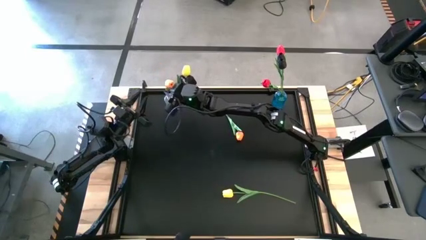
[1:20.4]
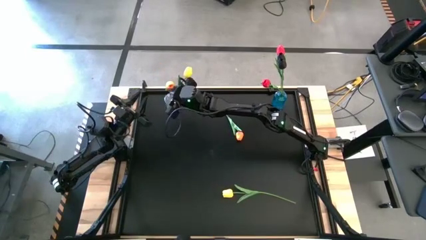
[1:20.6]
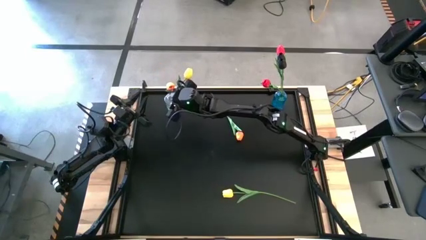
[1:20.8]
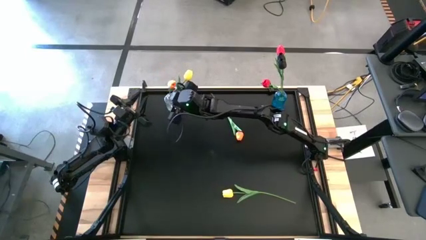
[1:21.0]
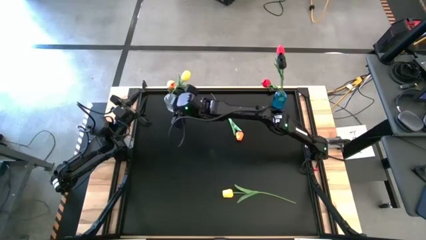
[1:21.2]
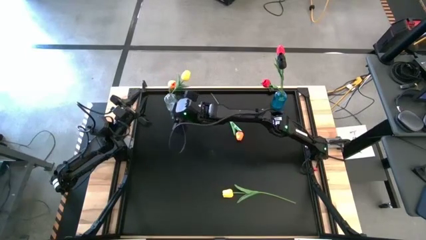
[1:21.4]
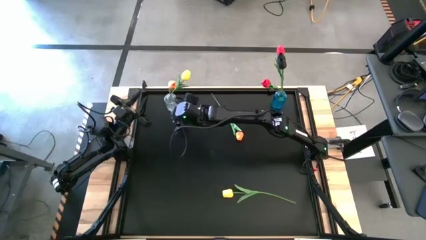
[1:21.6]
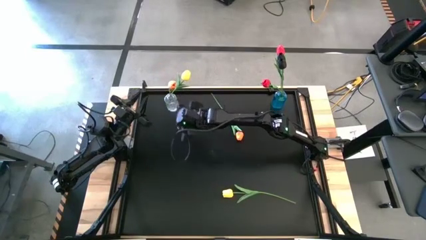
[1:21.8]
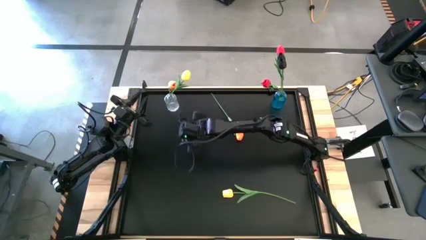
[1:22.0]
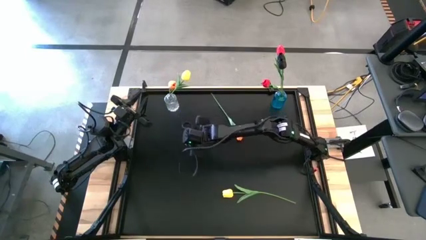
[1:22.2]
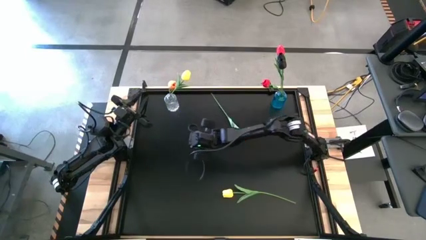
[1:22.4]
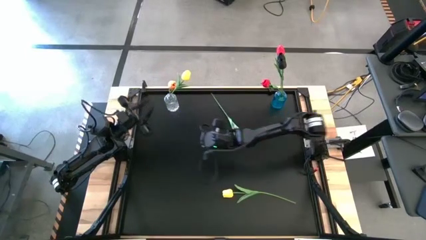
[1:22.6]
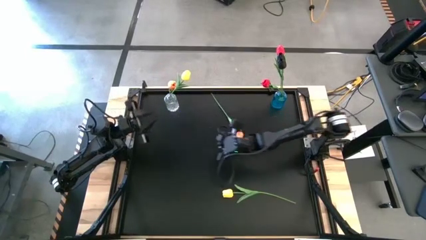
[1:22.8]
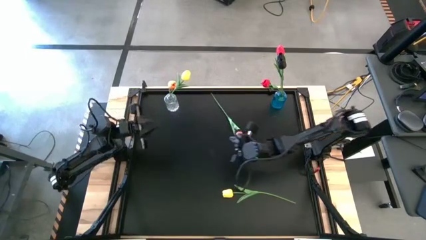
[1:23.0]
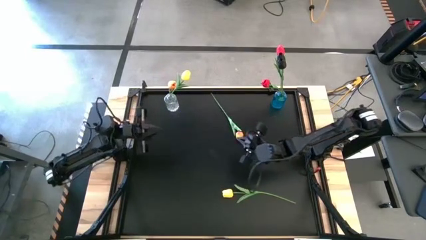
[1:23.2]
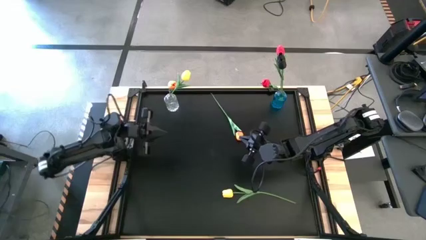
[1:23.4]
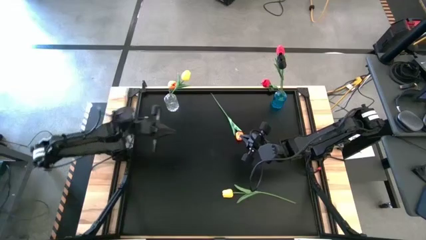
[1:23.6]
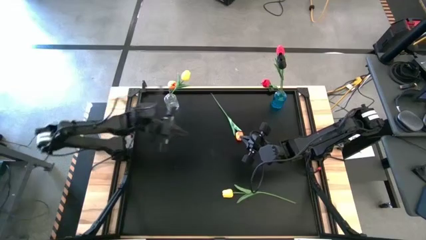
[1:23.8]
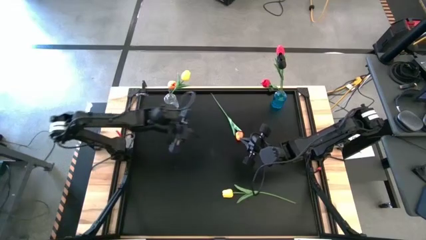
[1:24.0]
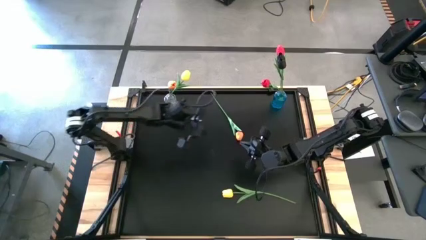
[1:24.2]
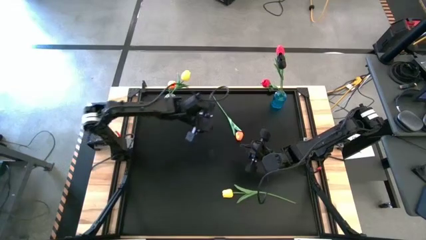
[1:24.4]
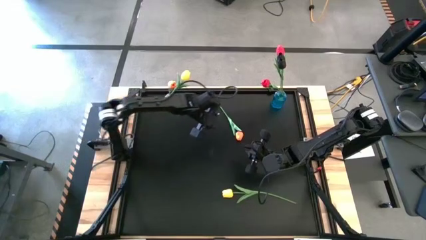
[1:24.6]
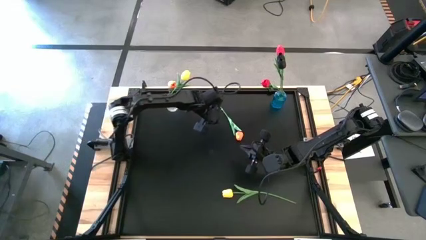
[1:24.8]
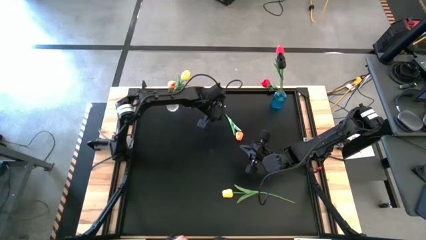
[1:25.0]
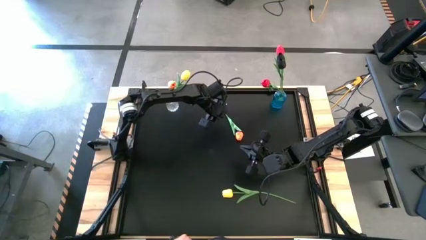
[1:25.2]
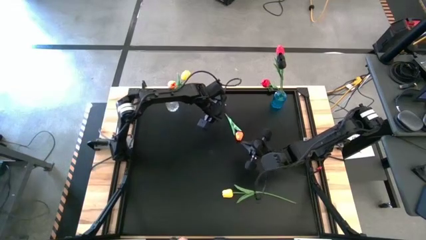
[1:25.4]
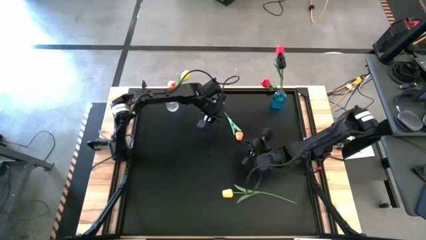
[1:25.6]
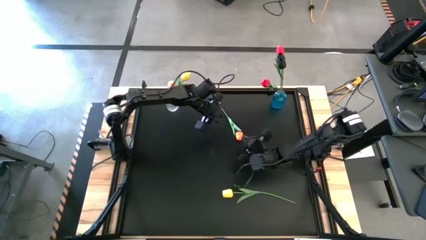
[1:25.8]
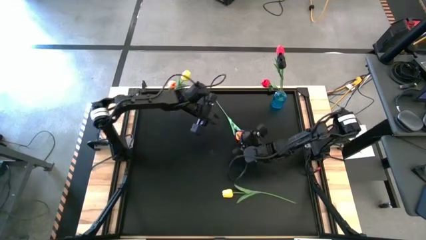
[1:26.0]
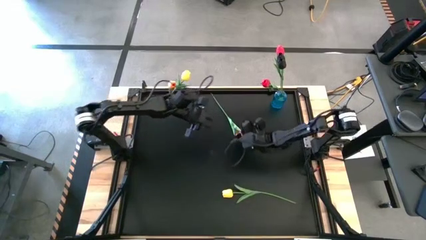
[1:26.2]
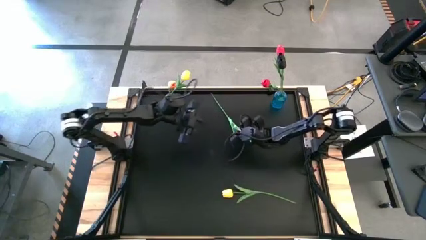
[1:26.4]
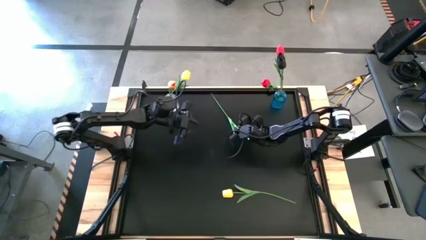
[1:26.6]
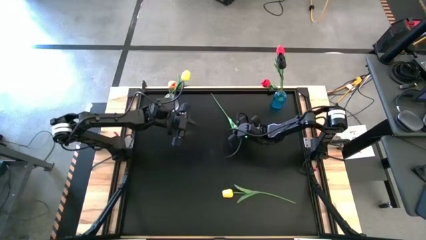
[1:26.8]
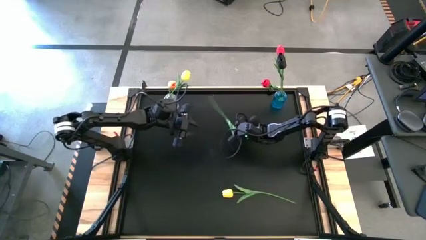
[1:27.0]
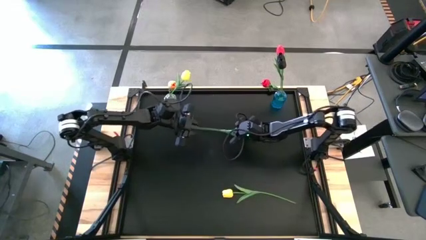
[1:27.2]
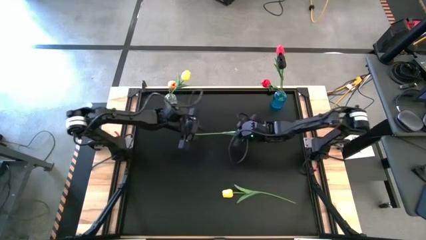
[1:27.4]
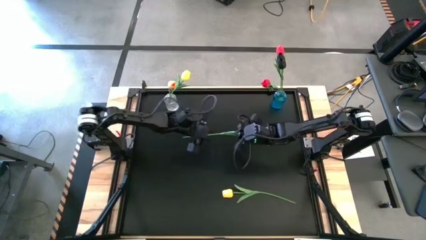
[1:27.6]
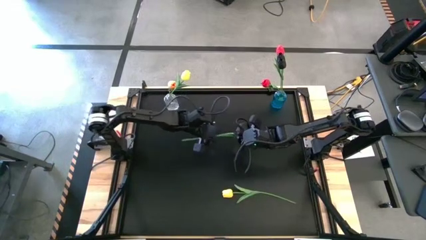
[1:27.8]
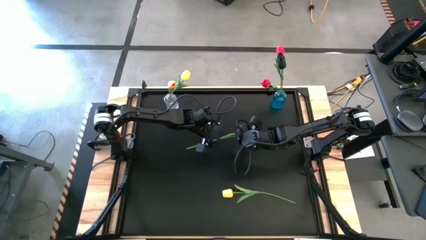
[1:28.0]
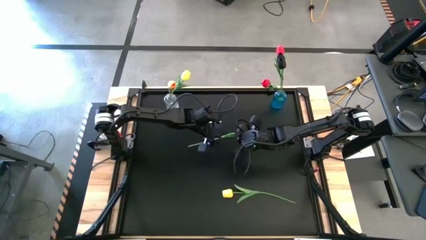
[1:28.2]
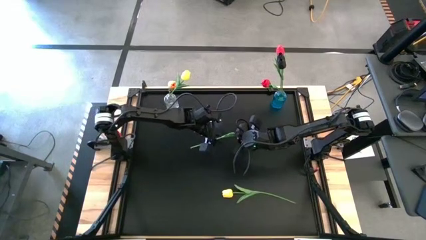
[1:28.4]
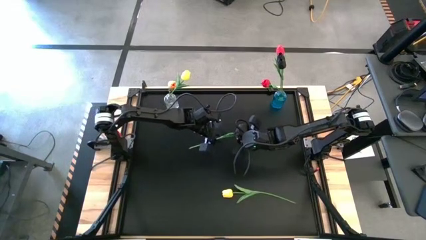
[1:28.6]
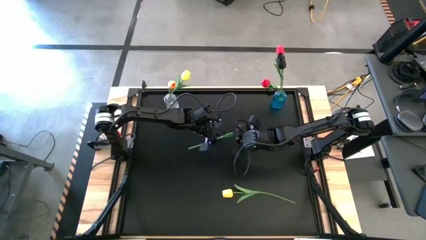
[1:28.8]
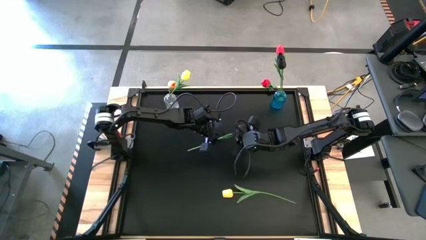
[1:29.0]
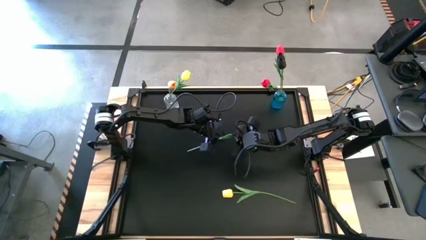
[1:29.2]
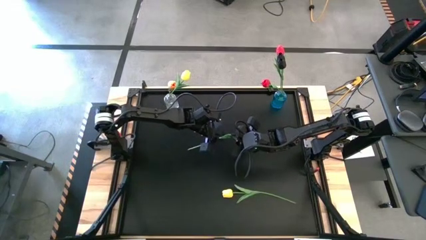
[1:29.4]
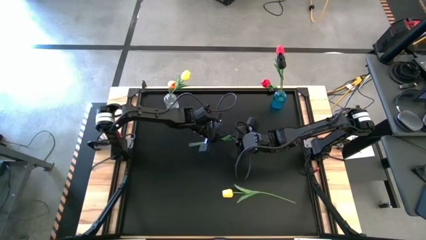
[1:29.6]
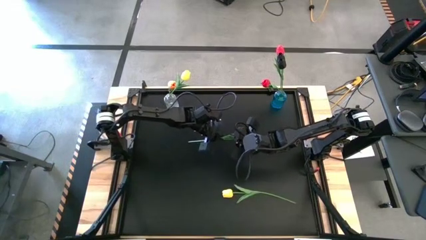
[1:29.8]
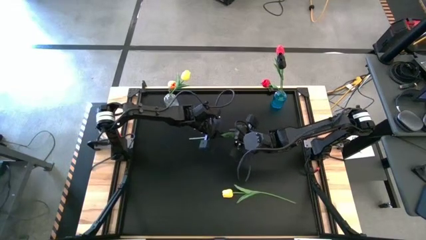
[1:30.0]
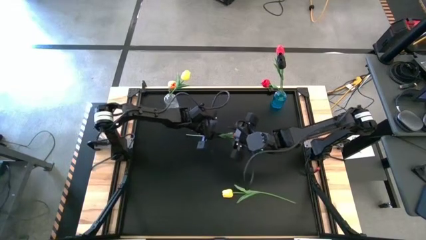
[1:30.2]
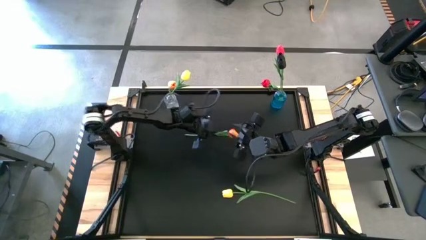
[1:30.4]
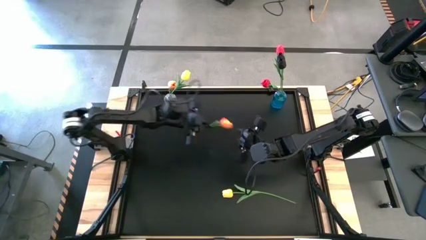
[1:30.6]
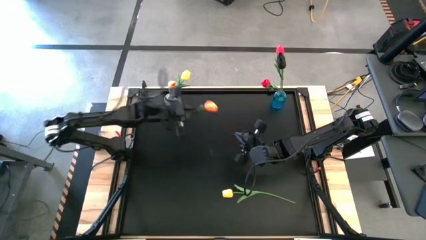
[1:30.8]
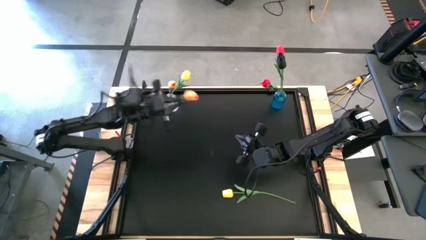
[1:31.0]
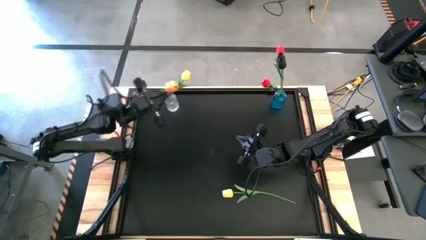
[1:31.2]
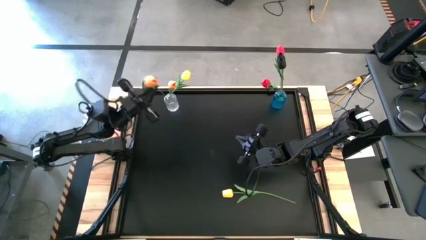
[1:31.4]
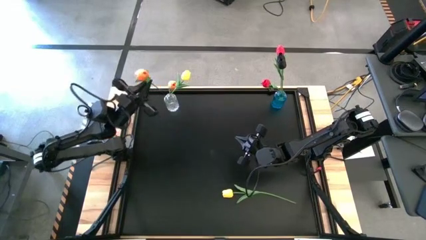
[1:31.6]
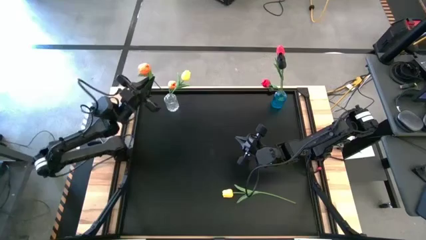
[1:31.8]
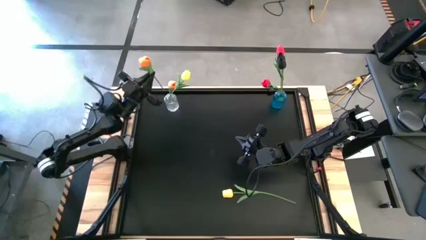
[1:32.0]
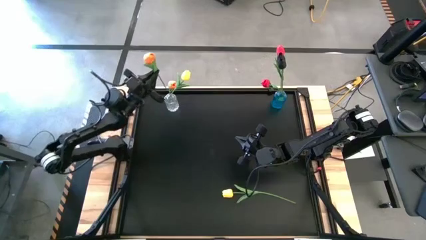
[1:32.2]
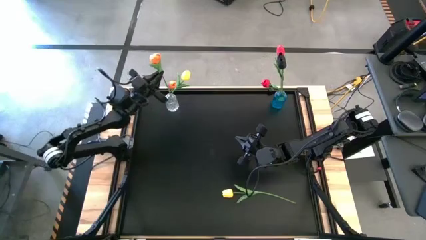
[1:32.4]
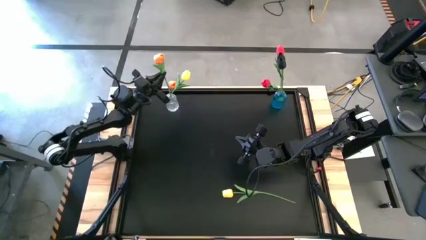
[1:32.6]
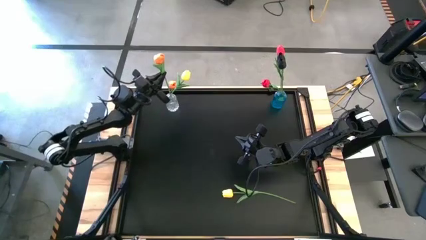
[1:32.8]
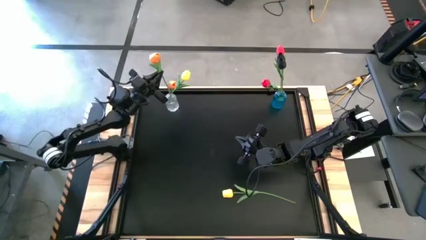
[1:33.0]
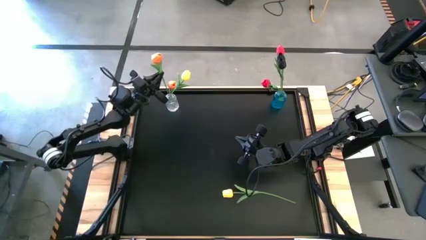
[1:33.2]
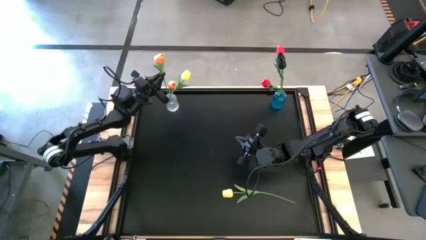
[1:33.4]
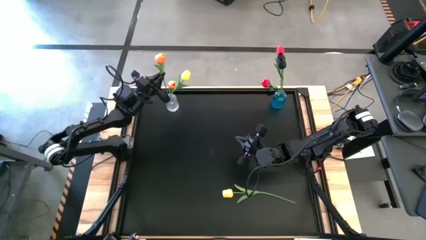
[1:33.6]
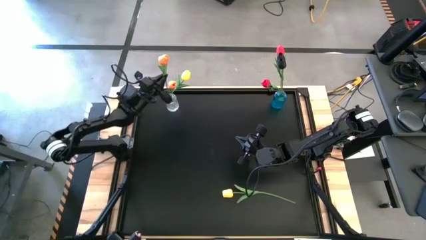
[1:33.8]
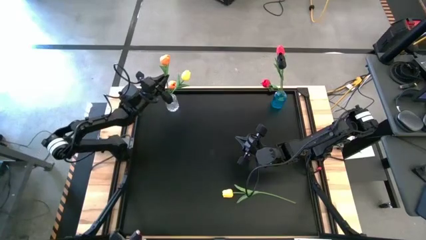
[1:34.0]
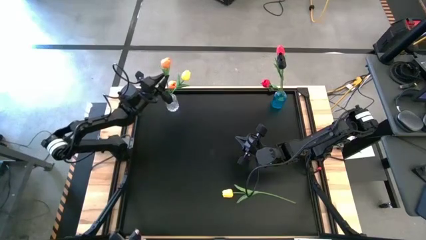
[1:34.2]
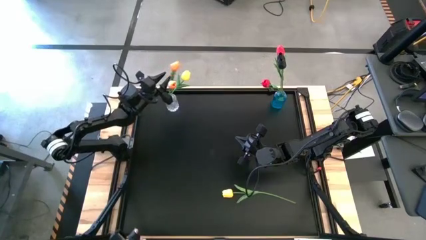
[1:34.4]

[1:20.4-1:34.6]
Task: Sort flowers into vase by color
Put the orange tulip into the transparent vase

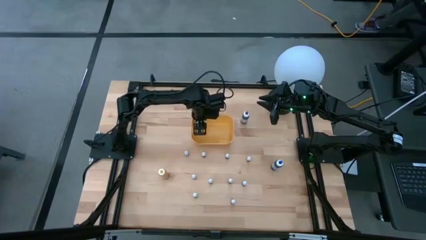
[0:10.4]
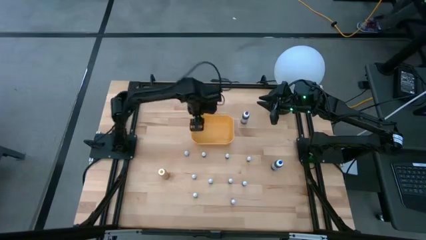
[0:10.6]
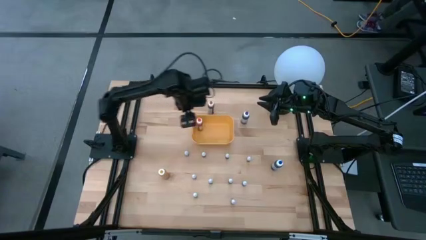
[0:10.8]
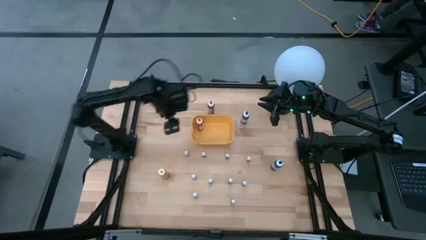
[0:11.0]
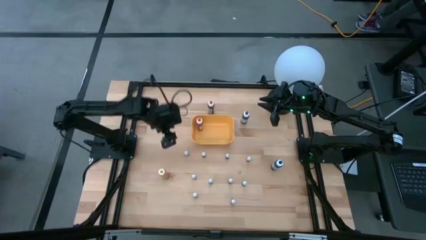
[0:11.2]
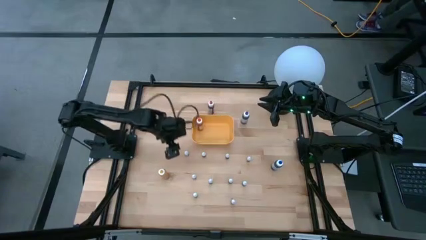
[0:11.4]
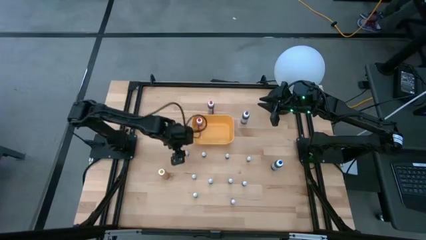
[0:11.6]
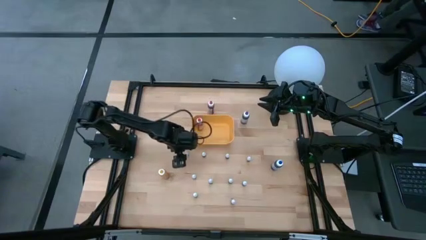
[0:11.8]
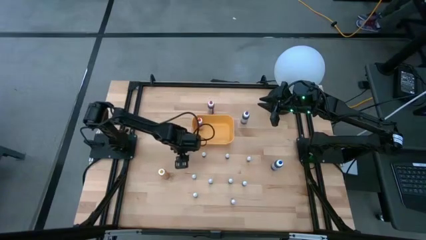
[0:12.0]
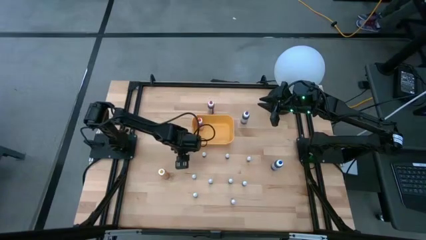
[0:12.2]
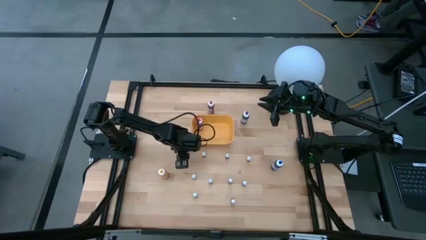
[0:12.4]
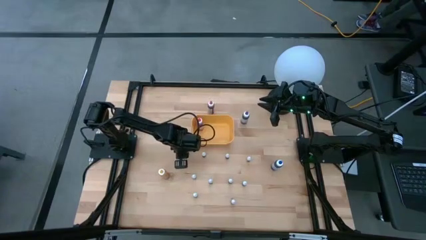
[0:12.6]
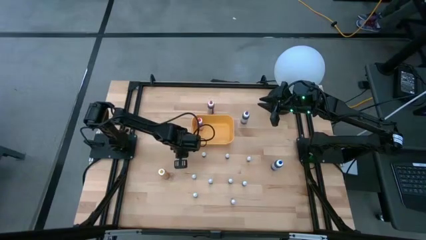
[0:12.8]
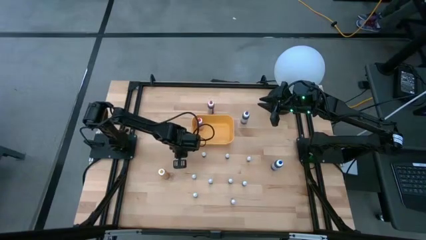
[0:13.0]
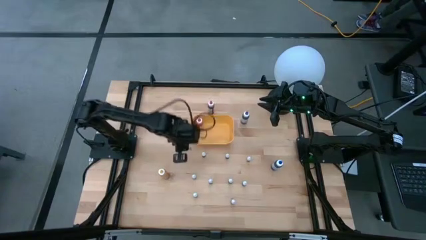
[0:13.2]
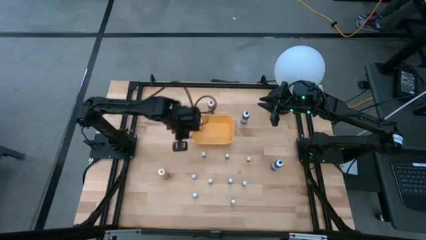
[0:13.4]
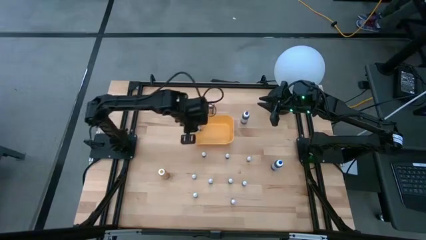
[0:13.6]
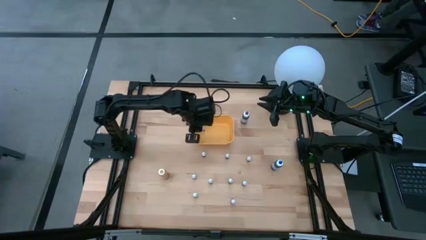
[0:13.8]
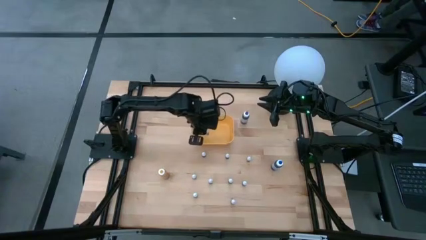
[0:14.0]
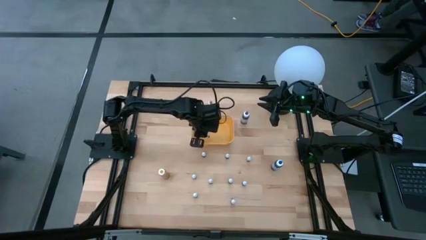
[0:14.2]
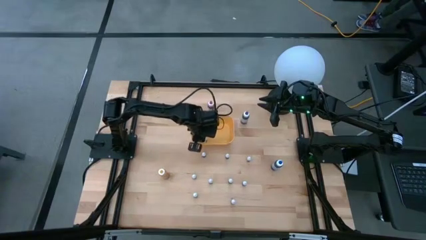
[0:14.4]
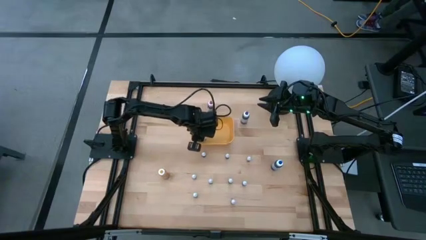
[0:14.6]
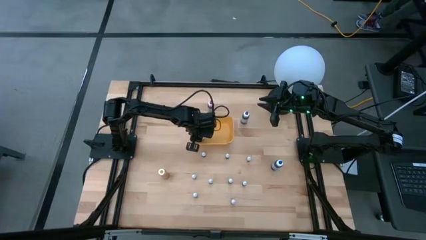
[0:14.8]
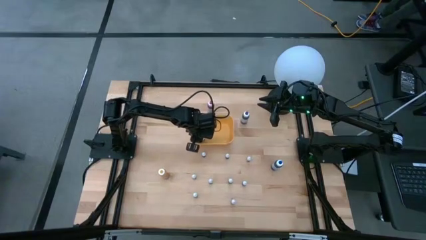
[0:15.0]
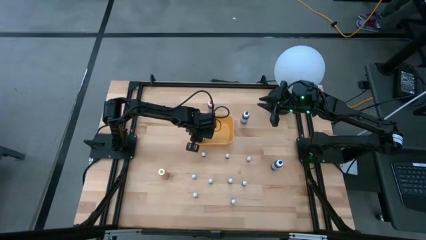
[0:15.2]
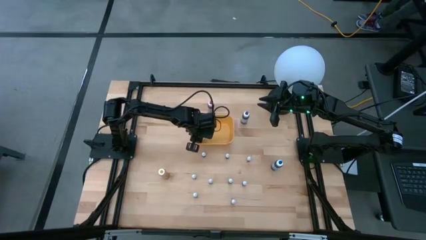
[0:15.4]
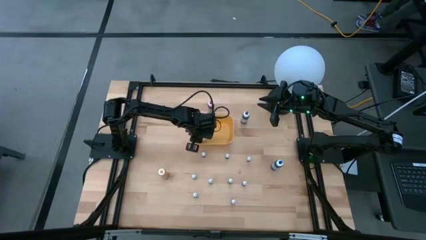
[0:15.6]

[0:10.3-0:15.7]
Task: Pick & Place food coloring
Put the top right small red food coloring bottle into the yellow bin
